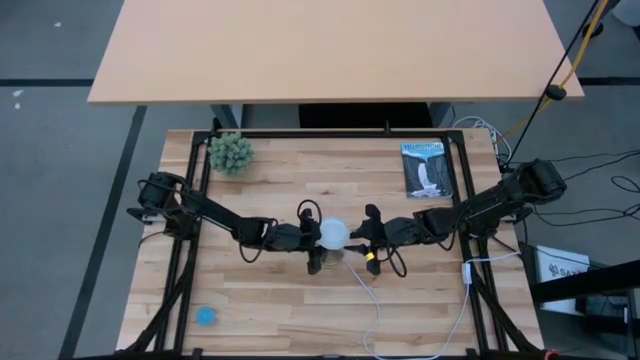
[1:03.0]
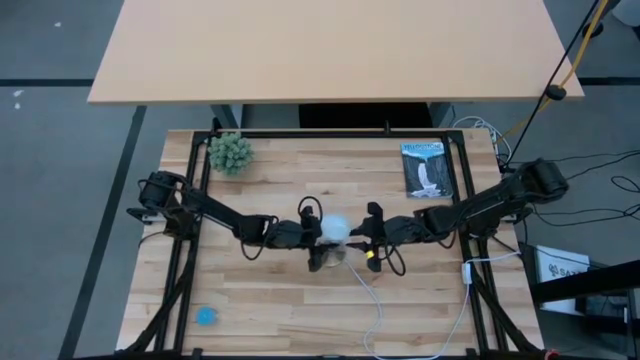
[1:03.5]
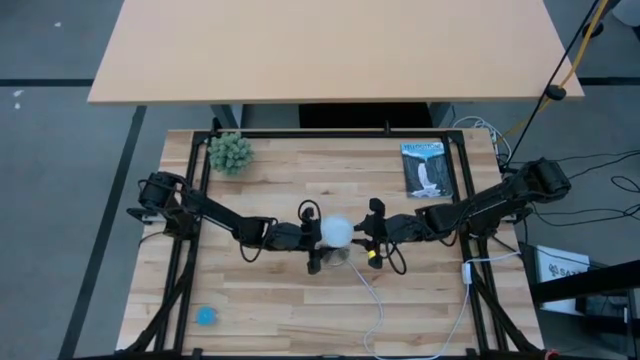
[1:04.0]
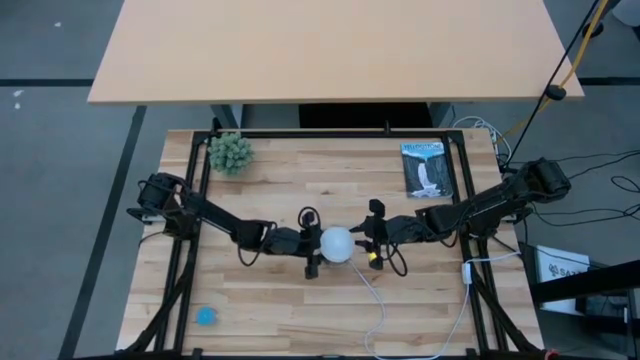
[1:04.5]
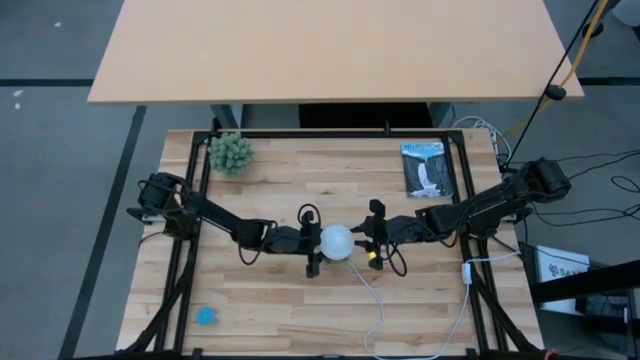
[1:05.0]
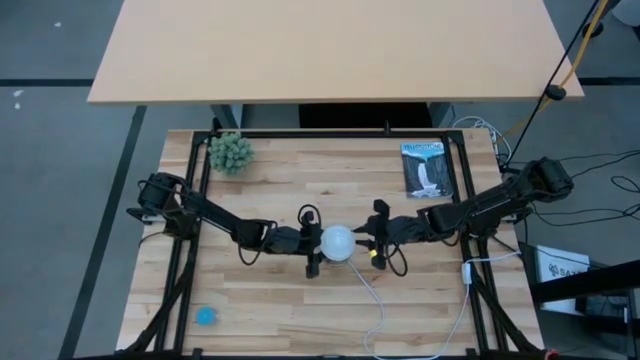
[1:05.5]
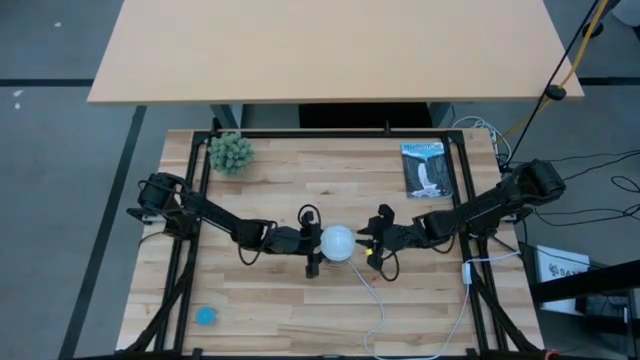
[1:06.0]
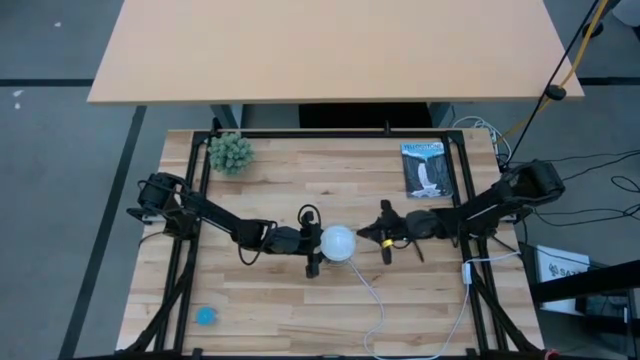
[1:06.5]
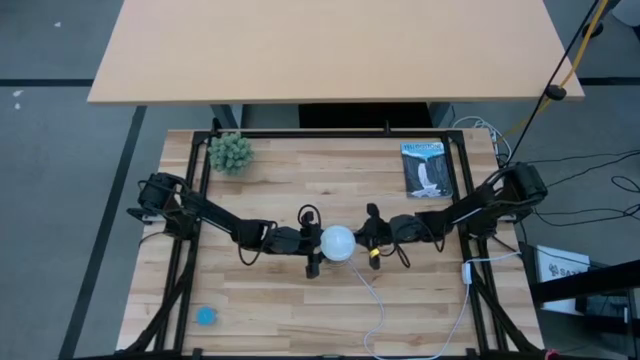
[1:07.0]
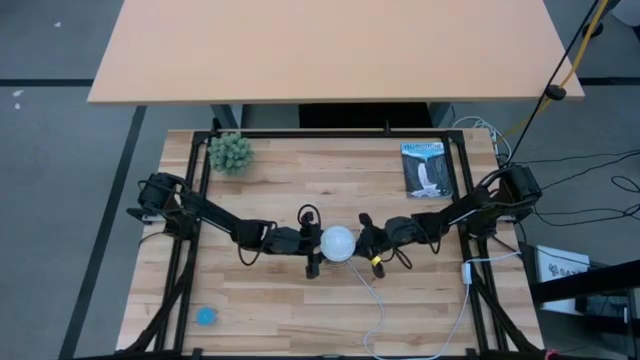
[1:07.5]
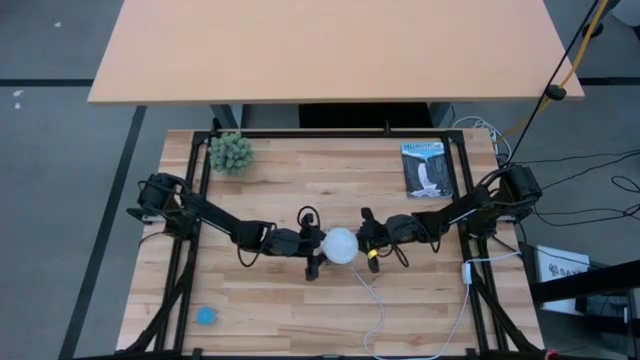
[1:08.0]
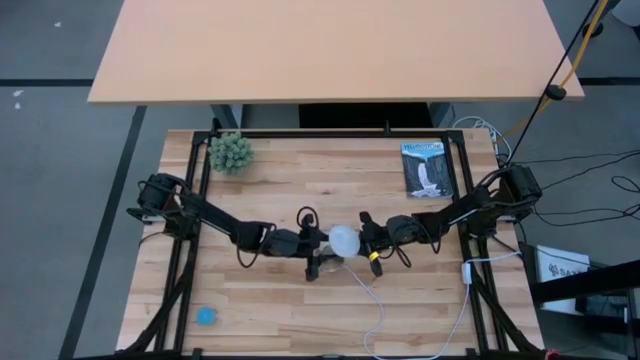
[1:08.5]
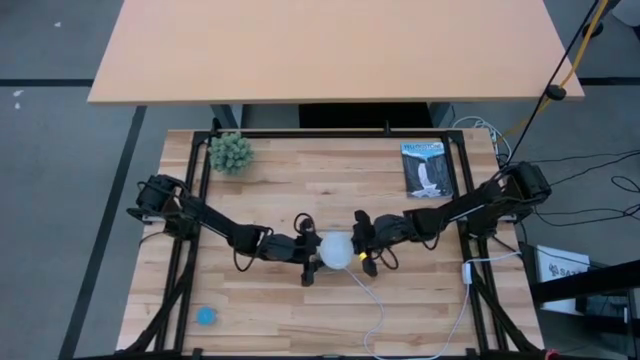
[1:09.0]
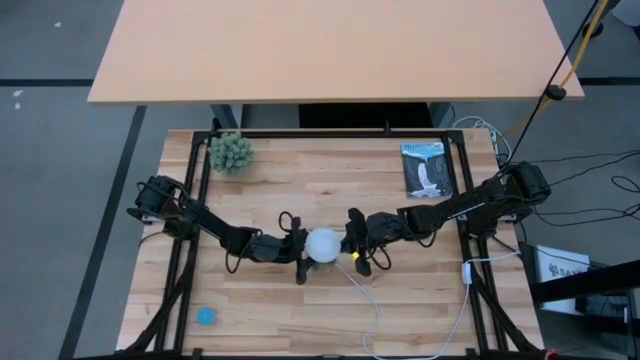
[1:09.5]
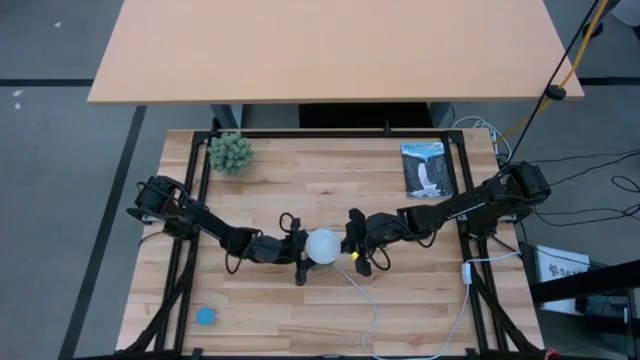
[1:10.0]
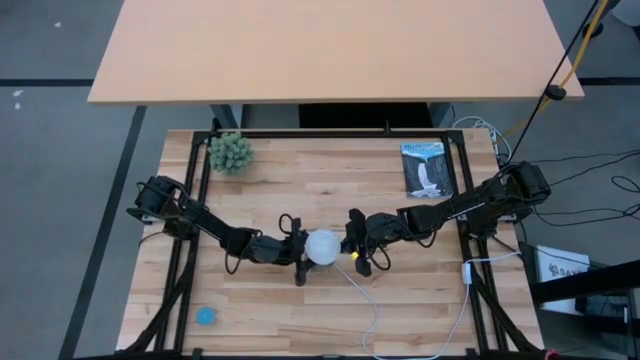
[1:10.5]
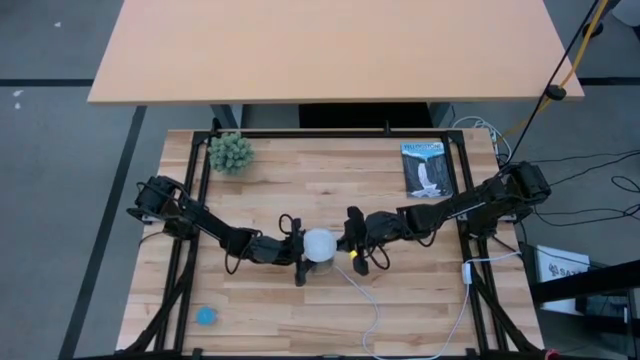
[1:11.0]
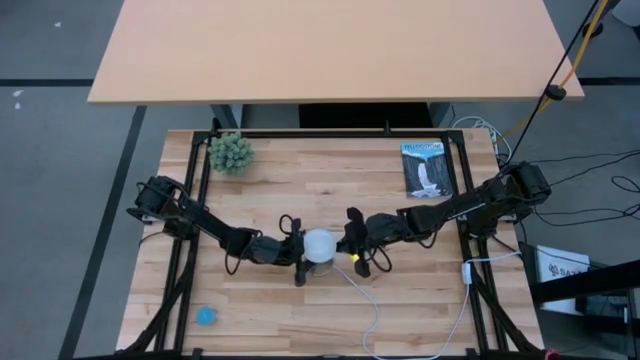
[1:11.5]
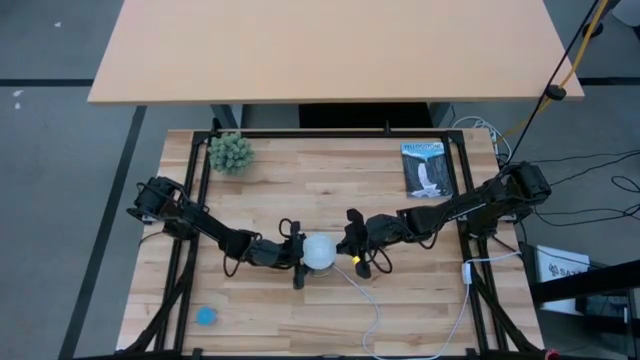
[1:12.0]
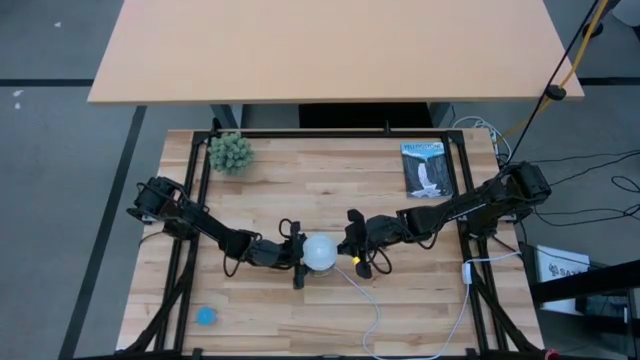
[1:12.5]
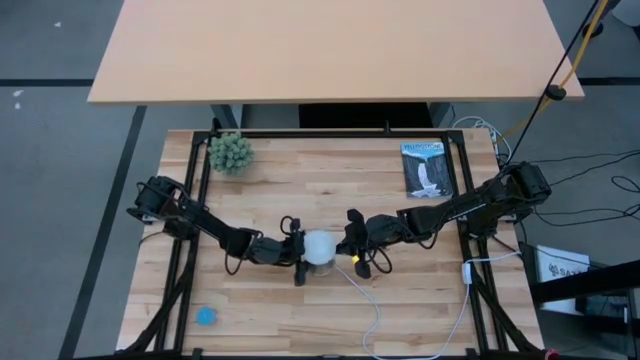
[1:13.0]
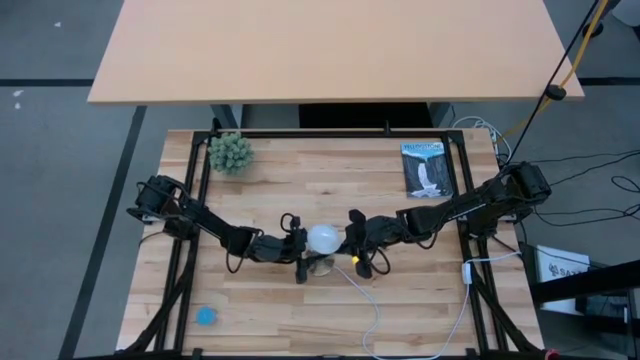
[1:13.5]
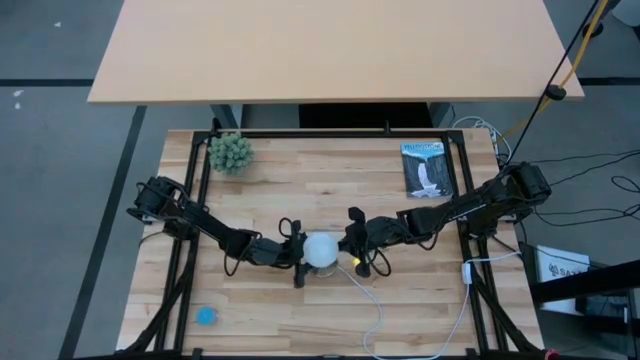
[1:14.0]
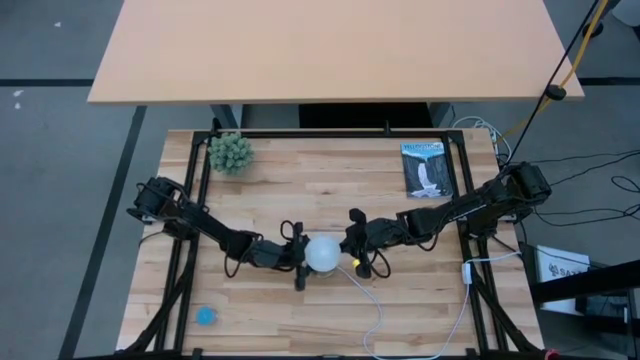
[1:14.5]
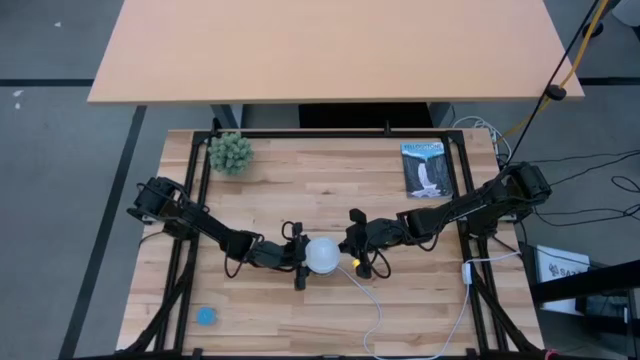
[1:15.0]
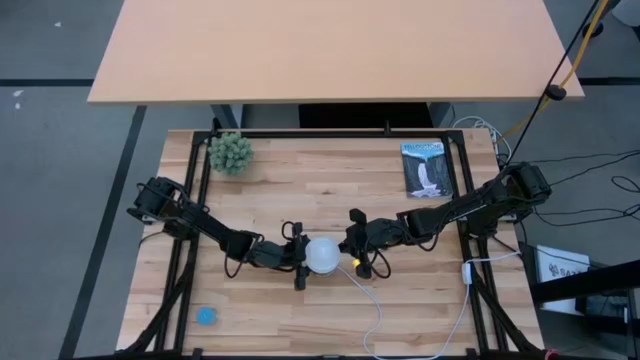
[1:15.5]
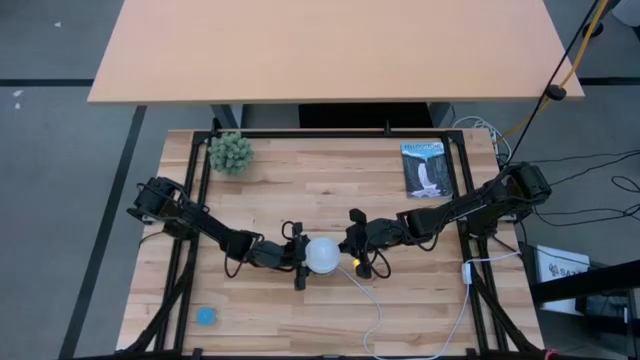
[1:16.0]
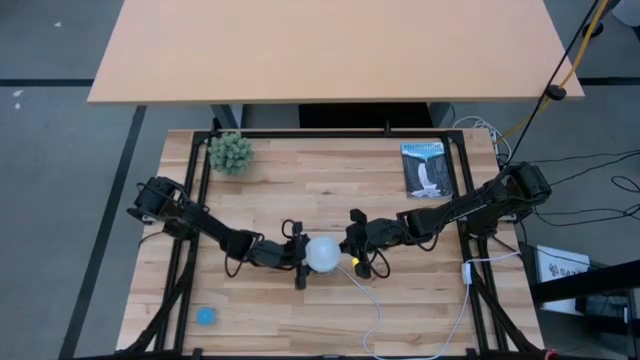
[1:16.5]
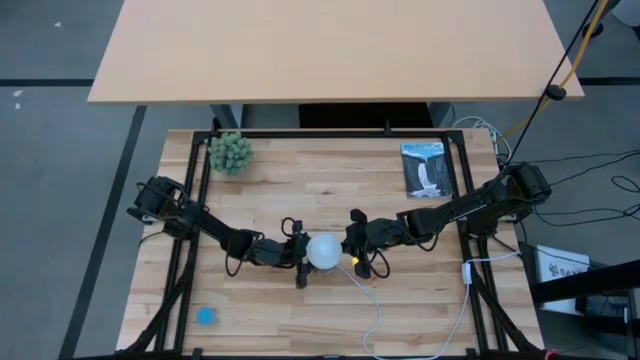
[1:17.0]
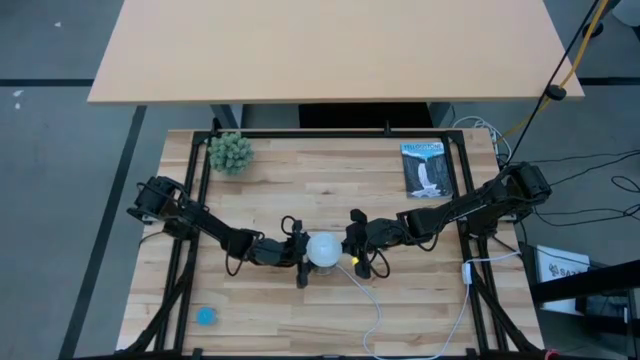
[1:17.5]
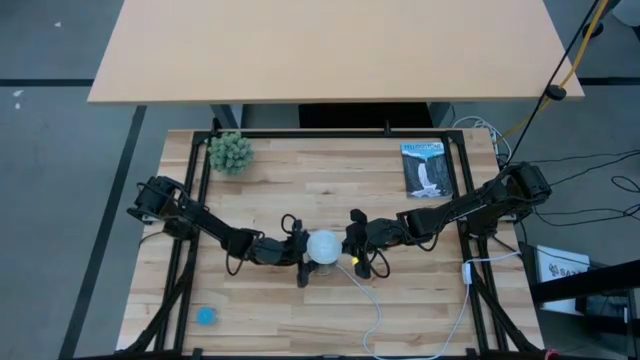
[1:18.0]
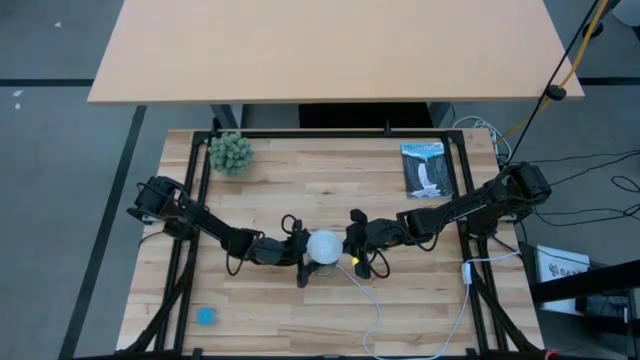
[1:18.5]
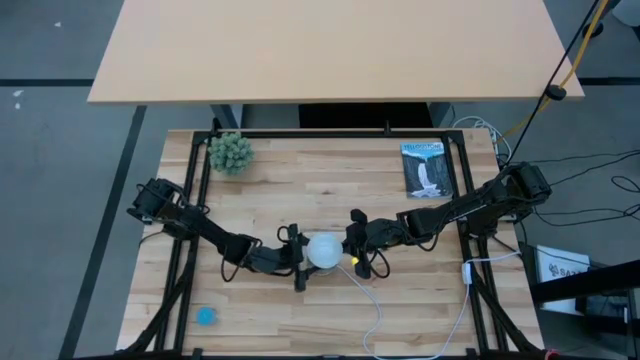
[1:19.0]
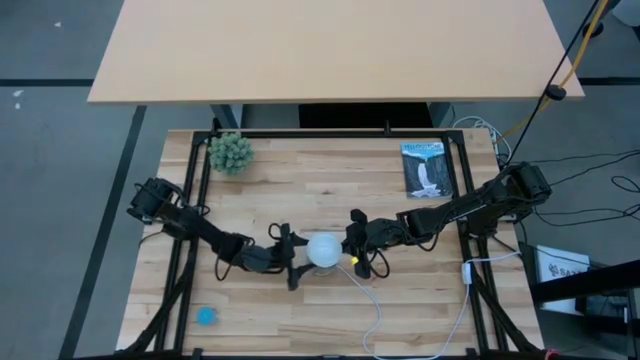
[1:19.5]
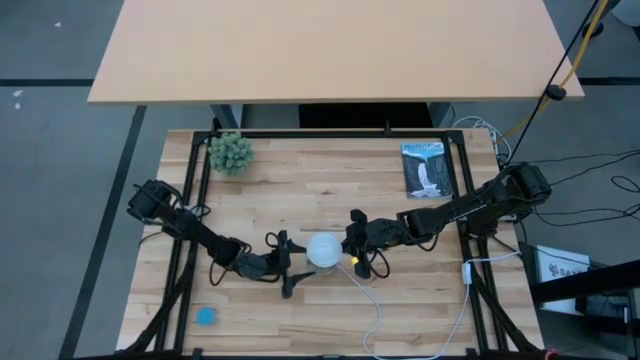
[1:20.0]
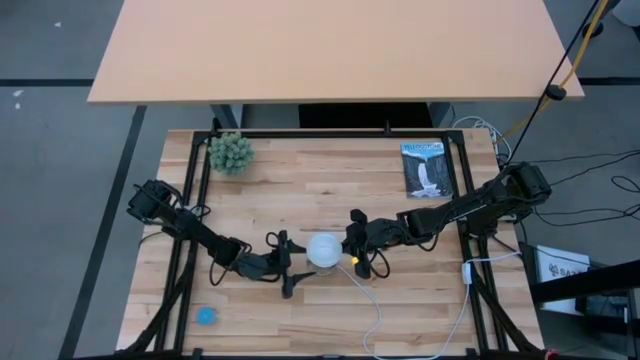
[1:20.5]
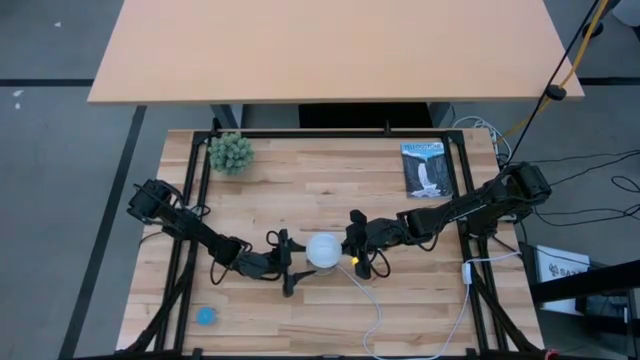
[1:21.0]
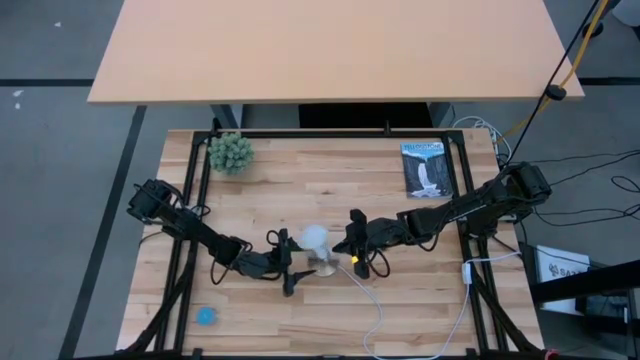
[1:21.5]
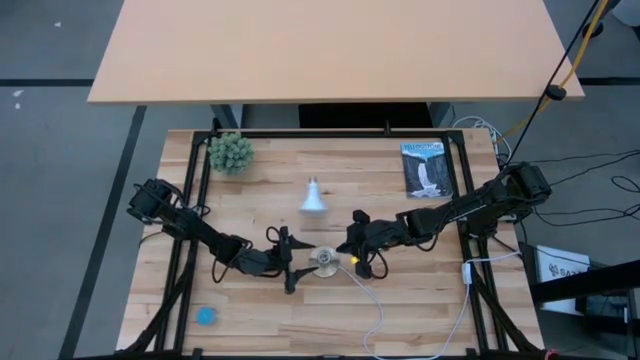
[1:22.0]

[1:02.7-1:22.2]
Task: Screw lightbulb
Insert the white lightbulb into the desk lamp
